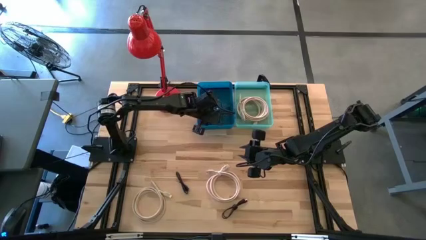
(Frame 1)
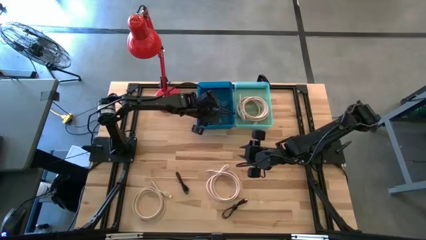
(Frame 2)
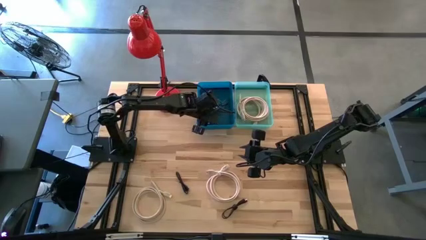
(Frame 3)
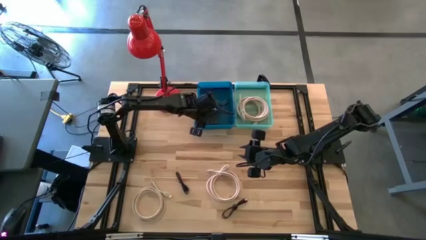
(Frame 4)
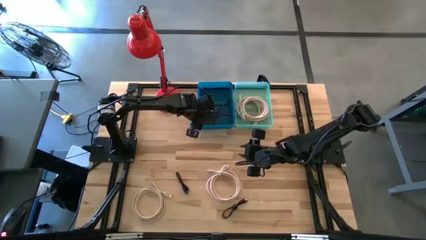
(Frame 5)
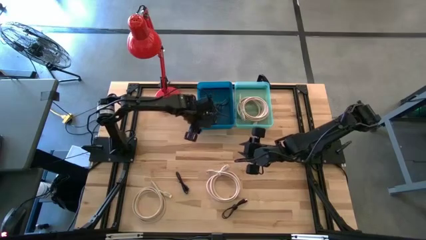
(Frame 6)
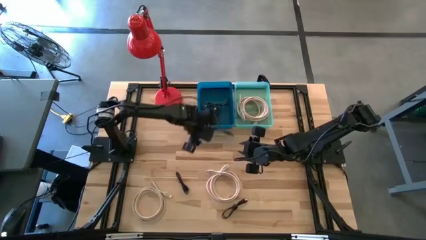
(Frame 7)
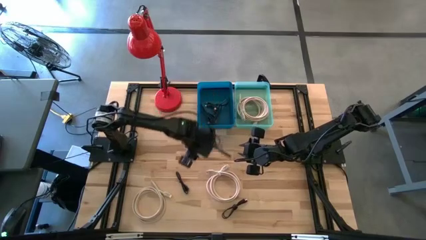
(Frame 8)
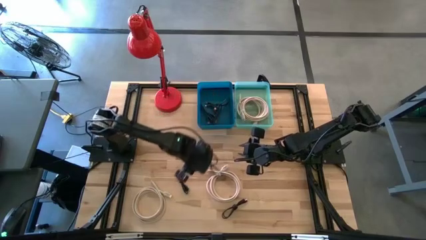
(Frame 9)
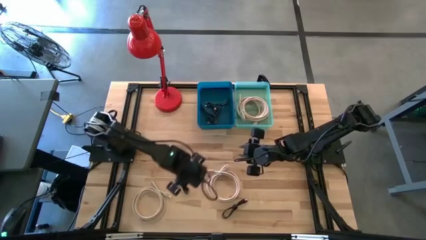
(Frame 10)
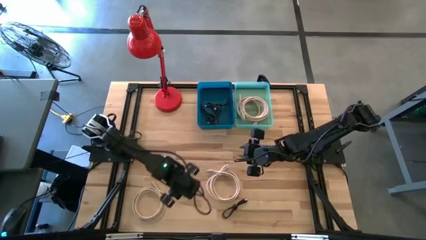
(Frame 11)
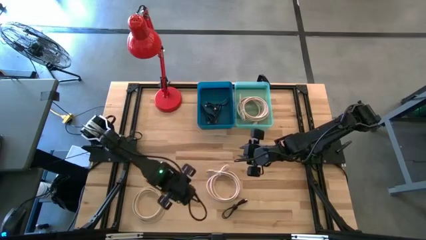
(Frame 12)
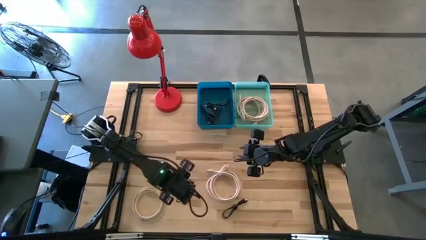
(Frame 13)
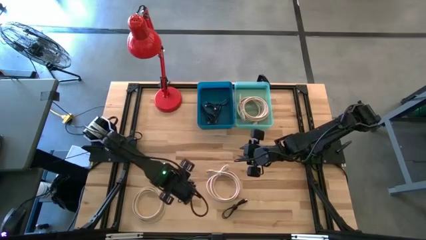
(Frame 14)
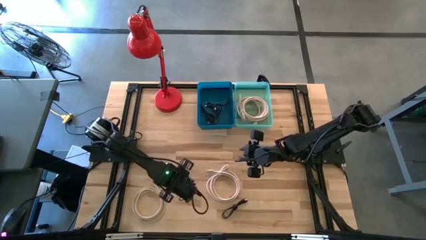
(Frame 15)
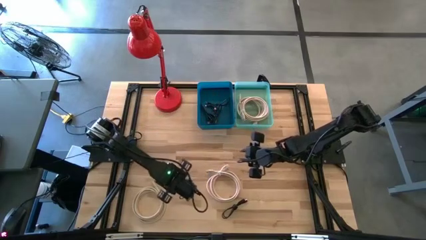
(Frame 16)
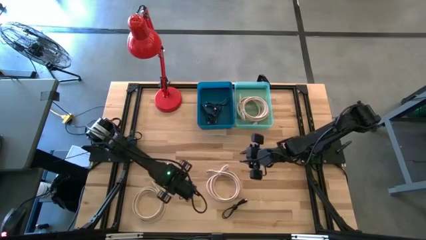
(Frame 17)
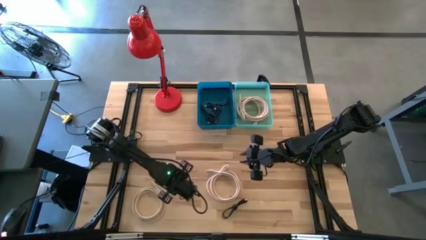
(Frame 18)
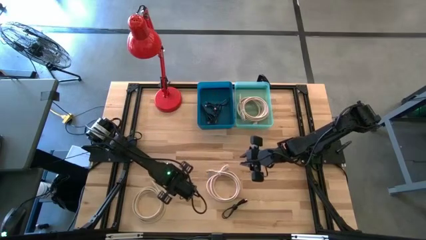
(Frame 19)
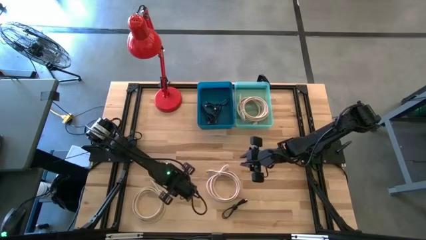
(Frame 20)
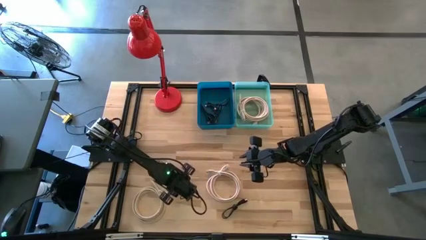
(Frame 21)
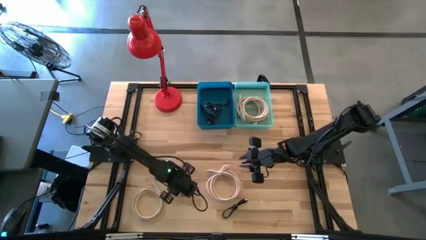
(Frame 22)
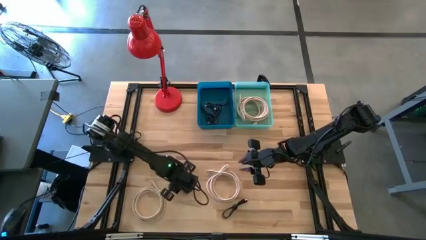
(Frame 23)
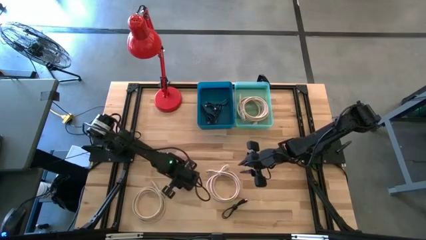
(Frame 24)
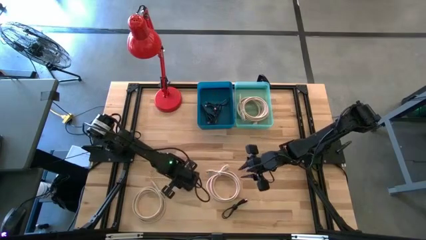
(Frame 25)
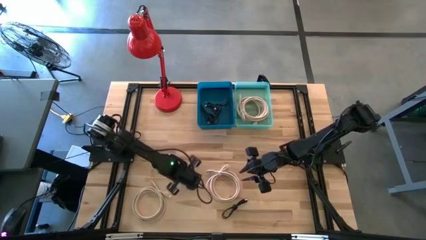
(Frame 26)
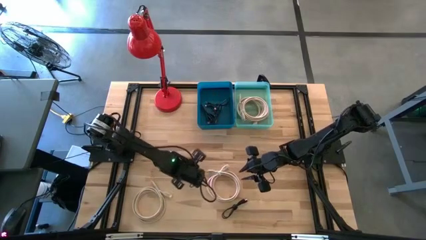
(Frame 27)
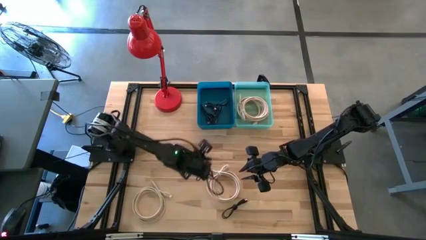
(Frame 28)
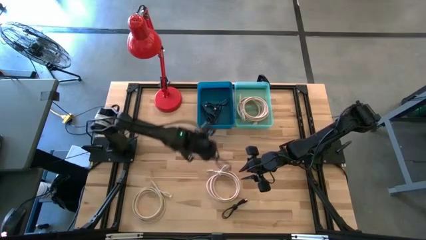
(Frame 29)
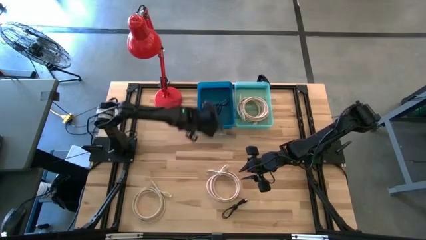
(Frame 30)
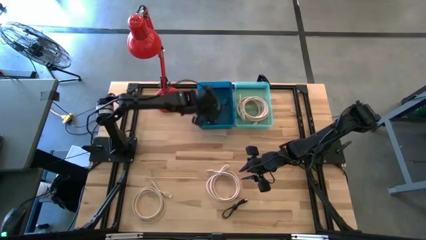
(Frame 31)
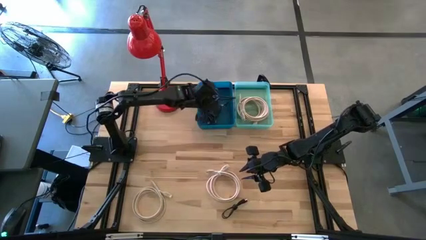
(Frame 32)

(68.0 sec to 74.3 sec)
Task: Pick & Place USB Port
Put the black USB cable into the blue bin

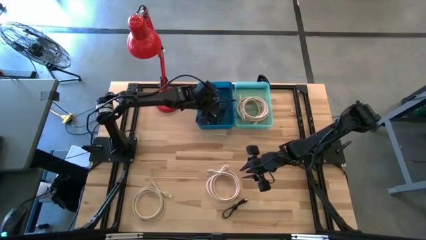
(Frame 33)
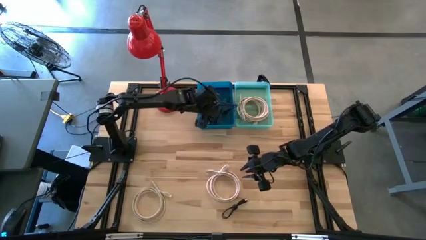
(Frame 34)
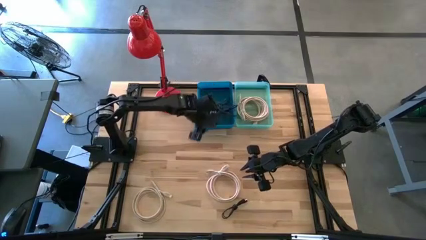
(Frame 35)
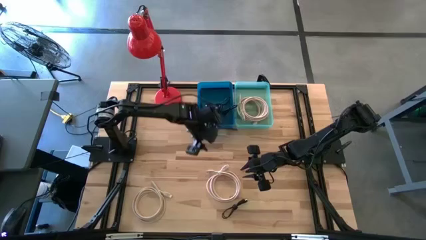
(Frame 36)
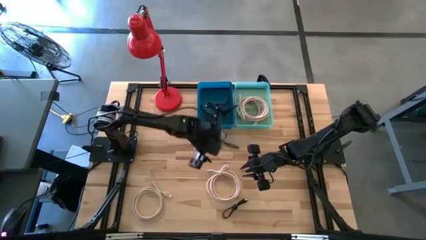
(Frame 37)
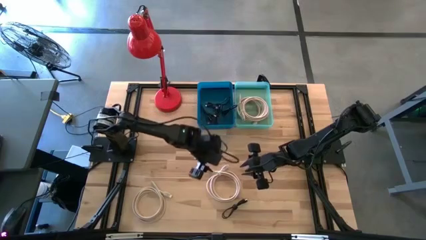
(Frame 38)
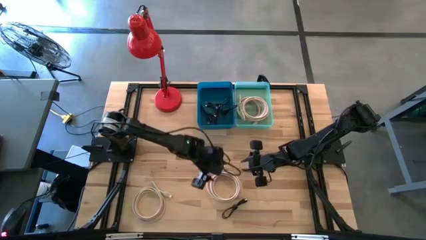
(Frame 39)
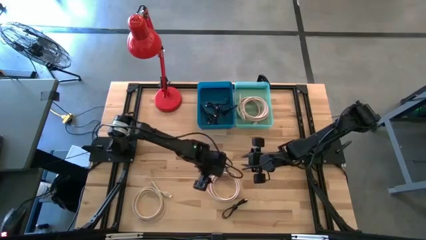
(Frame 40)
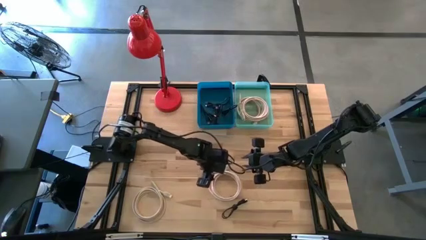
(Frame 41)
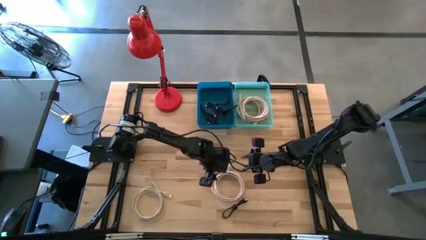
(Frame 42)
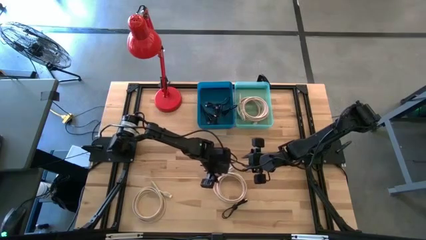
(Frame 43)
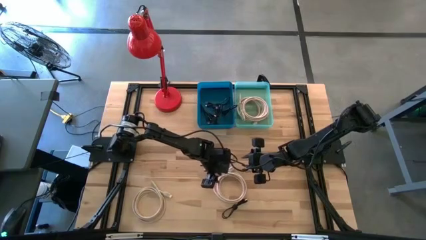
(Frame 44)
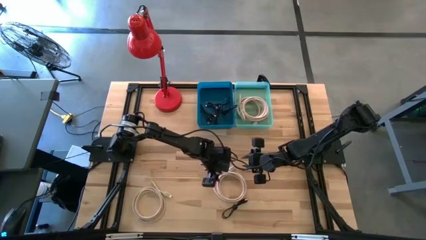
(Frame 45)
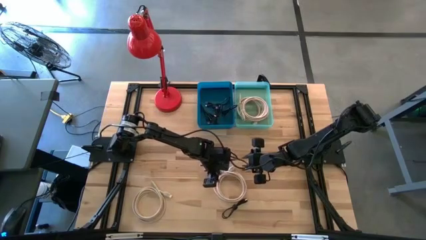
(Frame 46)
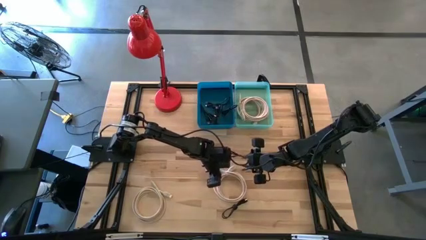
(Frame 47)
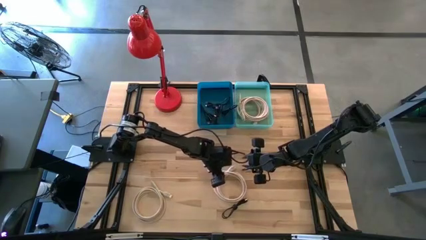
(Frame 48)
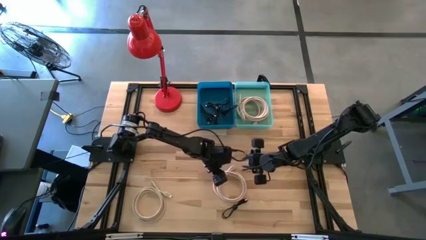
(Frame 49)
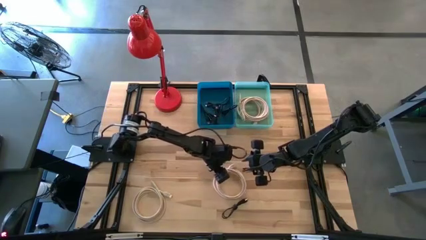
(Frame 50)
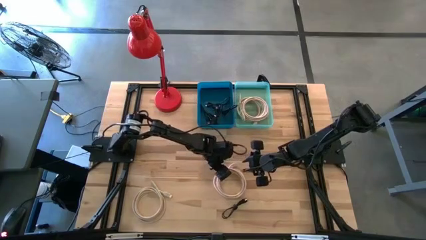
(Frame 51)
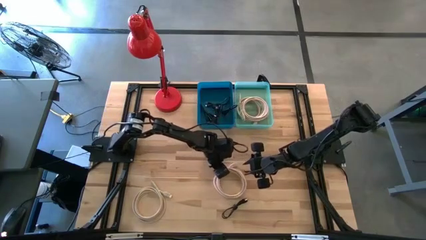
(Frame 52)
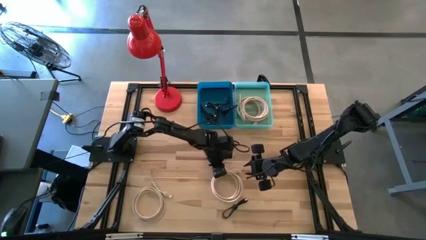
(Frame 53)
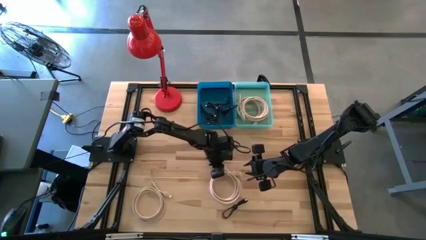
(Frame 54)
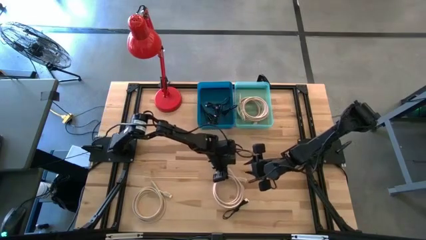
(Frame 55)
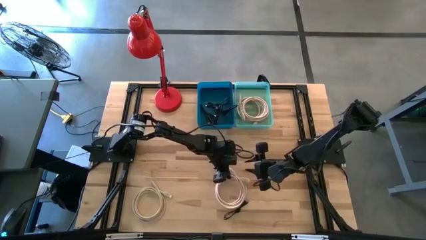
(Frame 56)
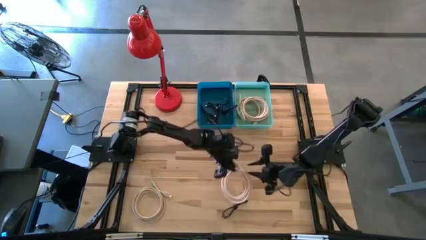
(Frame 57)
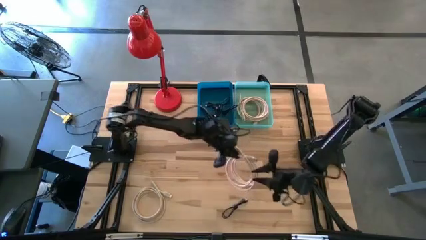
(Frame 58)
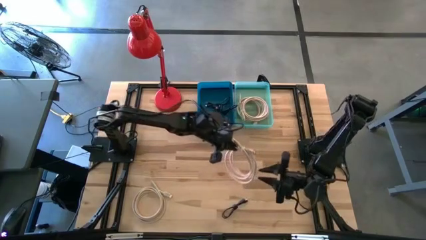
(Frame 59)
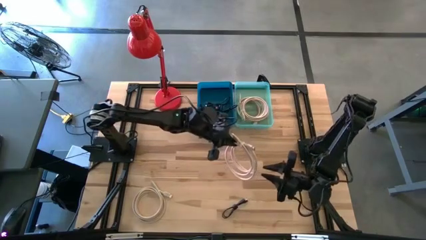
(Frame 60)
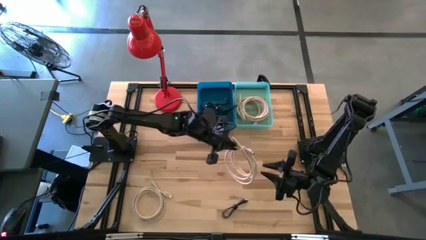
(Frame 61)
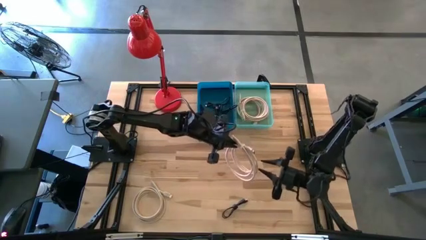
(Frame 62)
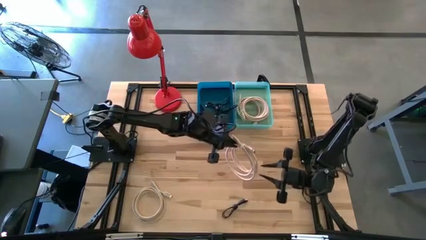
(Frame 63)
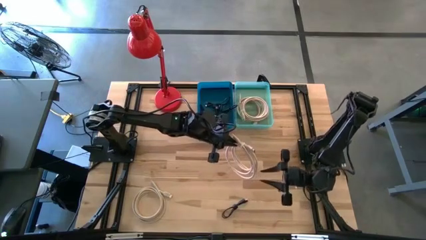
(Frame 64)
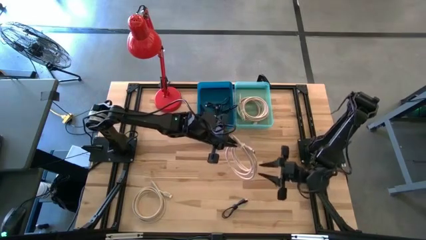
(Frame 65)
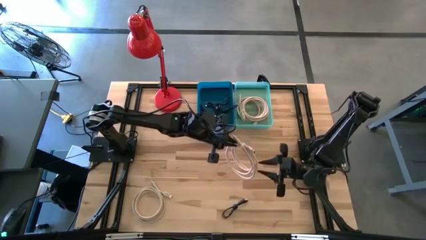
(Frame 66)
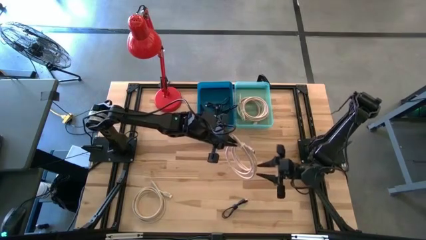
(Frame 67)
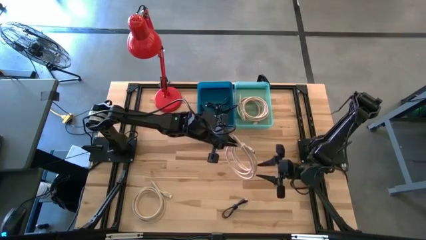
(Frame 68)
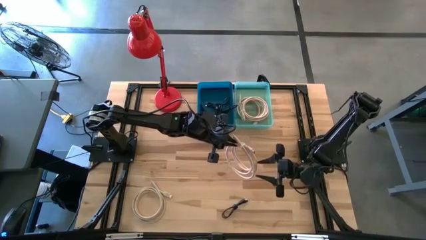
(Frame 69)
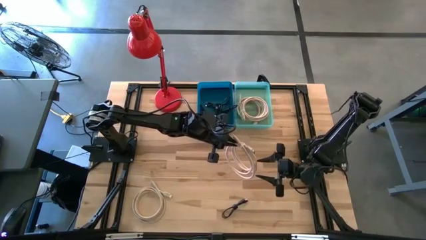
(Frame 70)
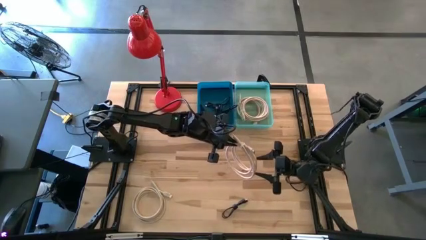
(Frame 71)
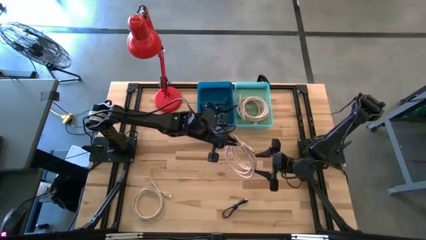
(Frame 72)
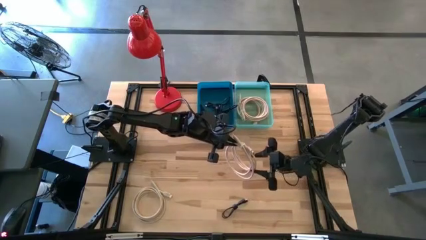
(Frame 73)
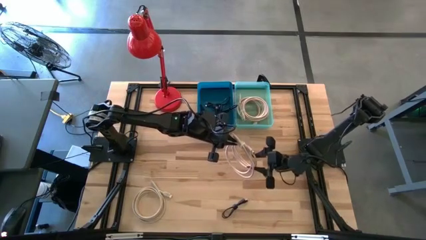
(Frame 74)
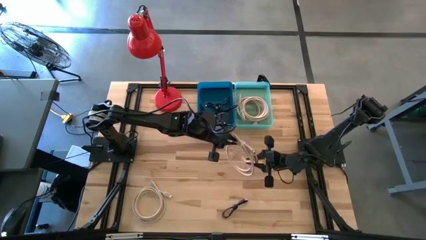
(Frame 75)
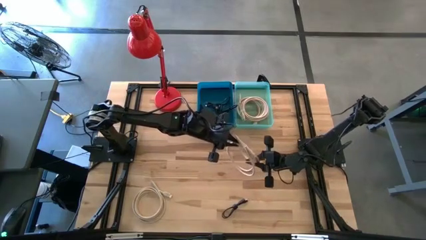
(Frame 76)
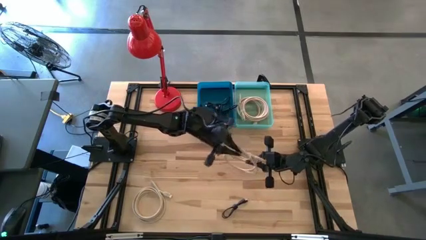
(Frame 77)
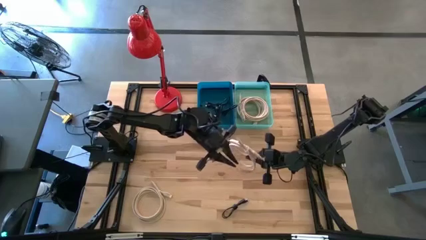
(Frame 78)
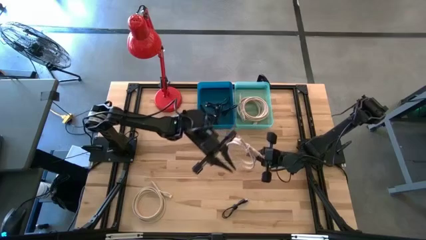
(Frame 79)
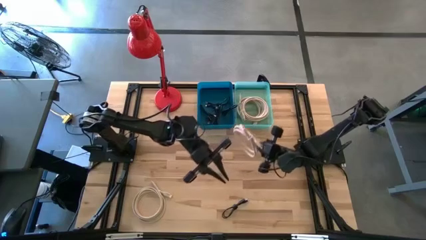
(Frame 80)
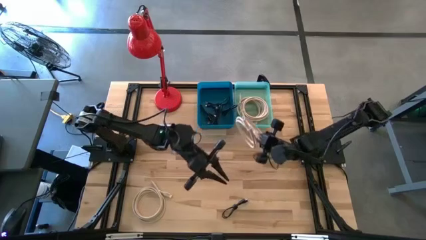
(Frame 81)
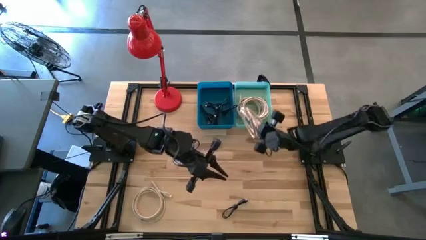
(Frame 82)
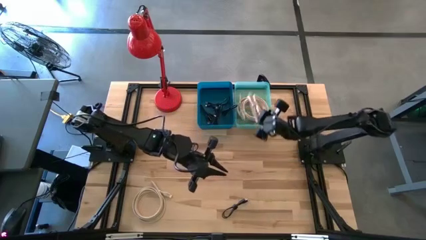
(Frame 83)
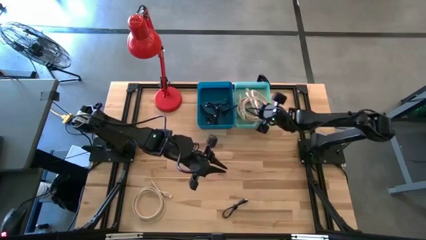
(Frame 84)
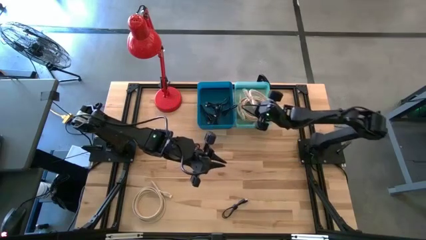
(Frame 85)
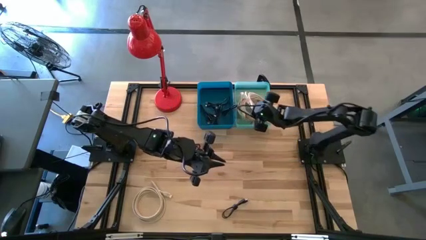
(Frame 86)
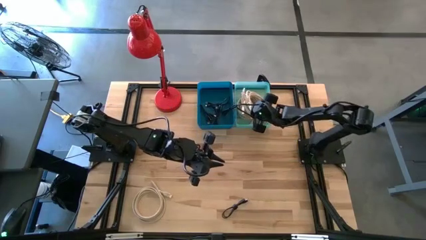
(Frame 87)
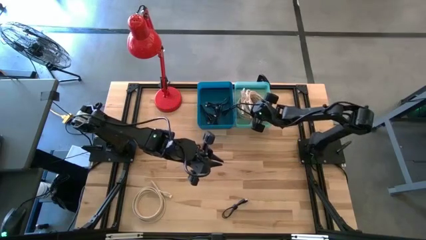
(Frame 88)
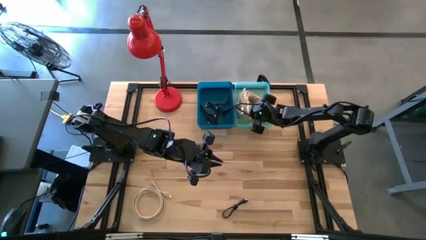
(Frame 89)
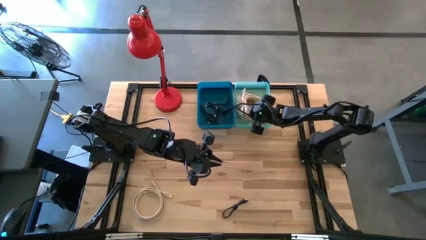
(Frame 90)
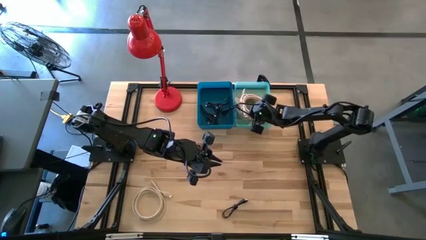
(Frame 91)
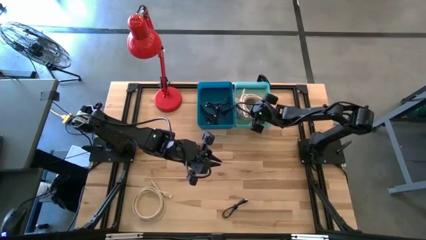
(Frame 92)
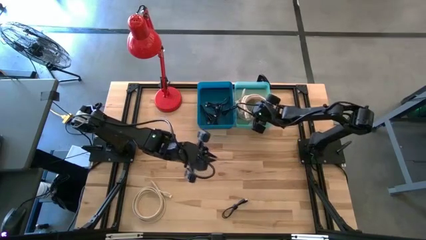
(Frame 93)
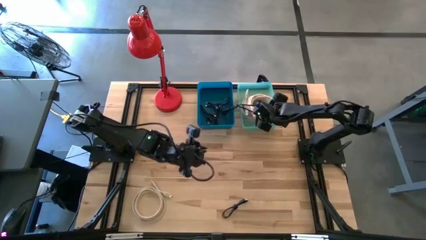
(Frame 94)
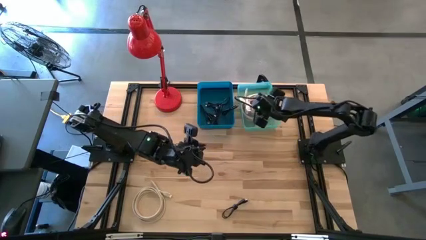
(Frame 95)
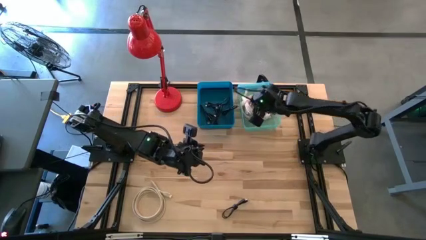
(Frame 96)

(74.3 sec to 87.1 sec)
Put the brown HDMI cable into the green bin
